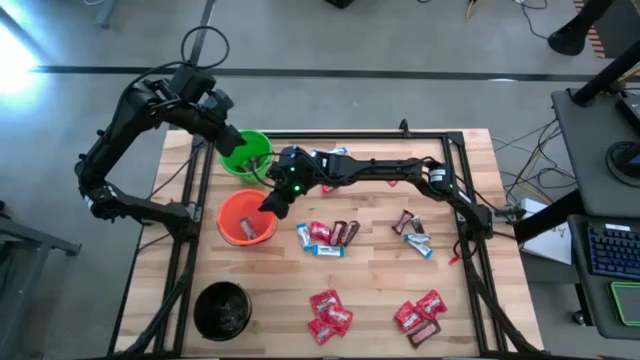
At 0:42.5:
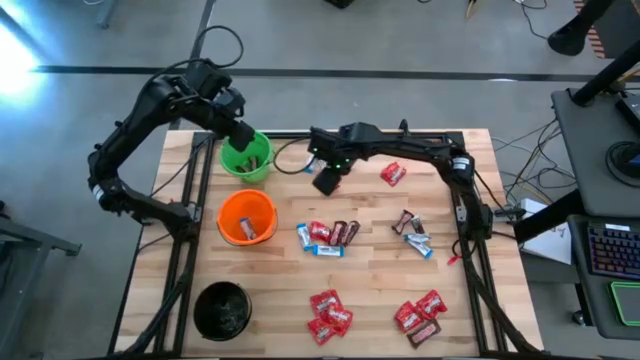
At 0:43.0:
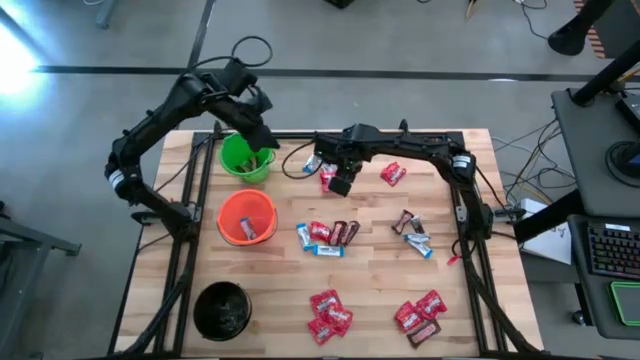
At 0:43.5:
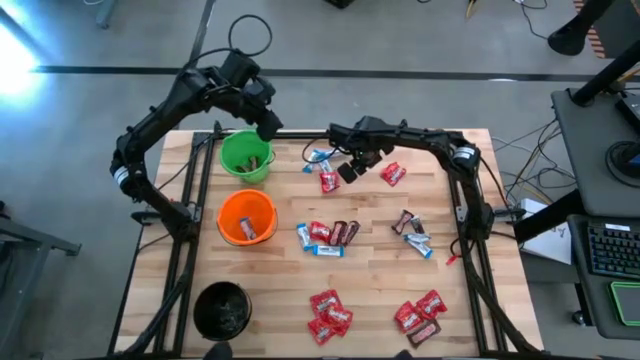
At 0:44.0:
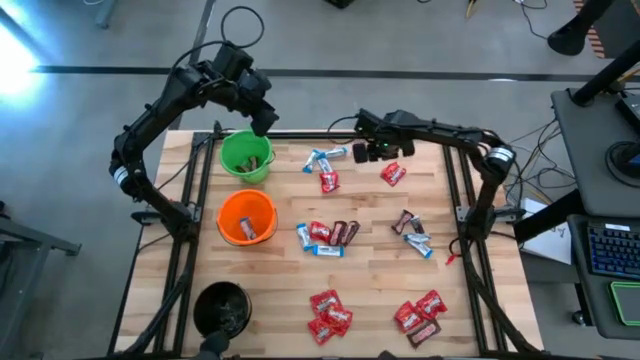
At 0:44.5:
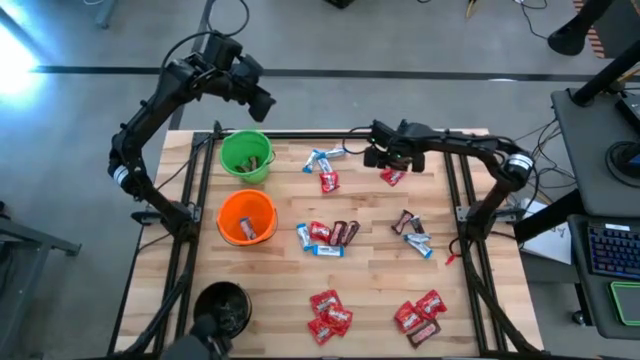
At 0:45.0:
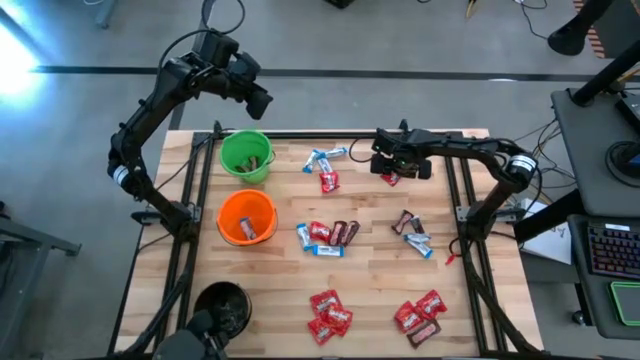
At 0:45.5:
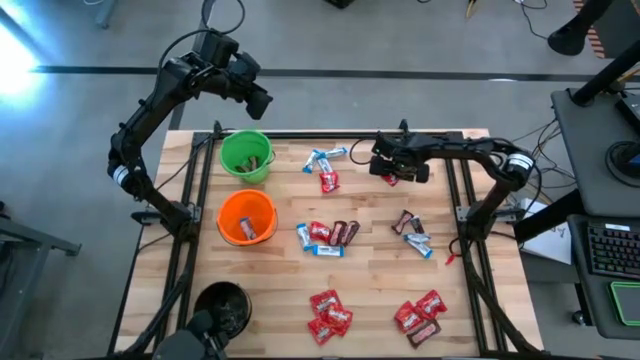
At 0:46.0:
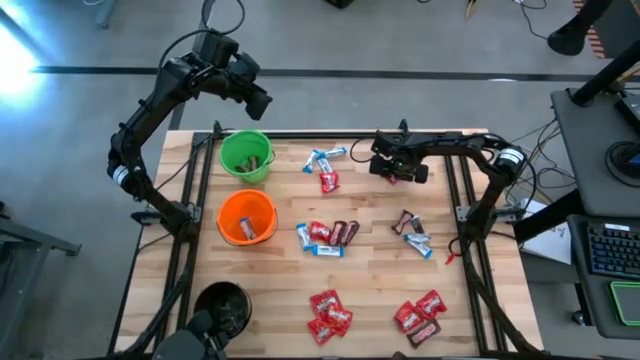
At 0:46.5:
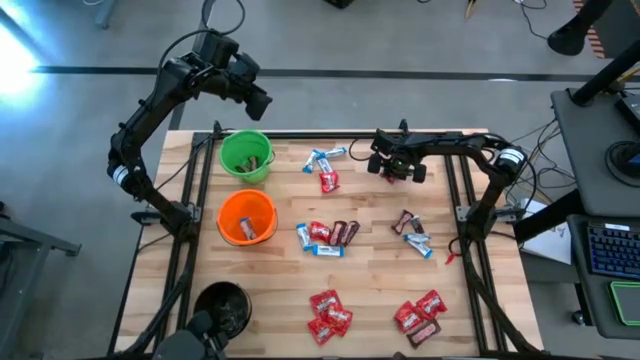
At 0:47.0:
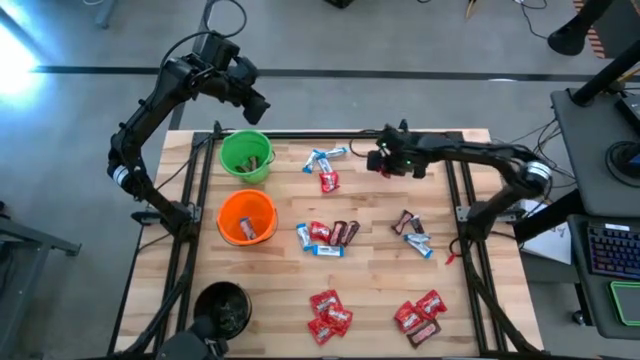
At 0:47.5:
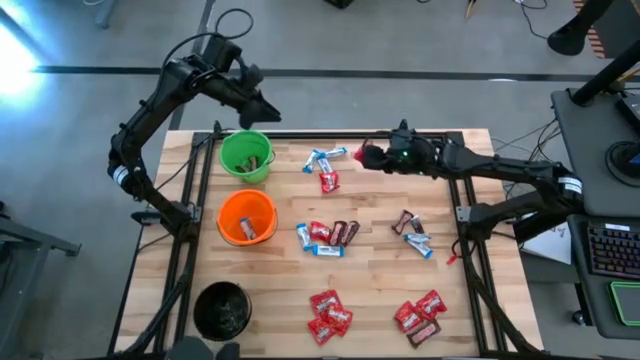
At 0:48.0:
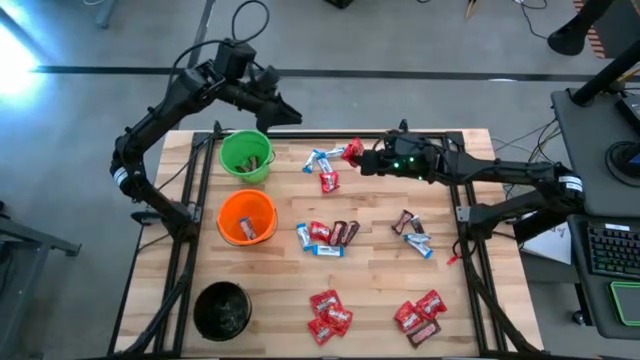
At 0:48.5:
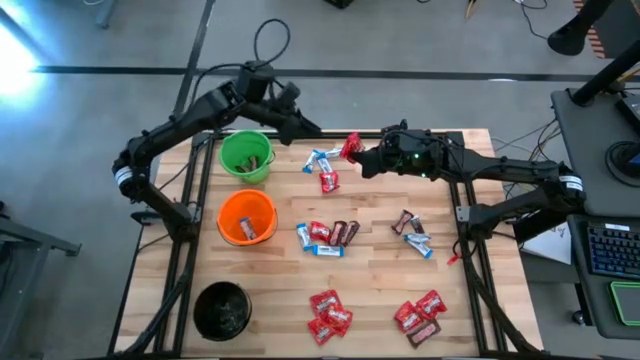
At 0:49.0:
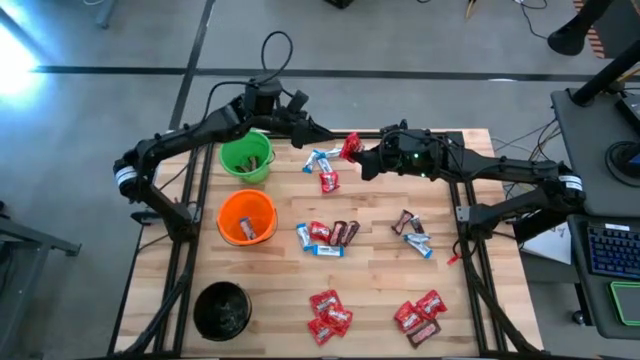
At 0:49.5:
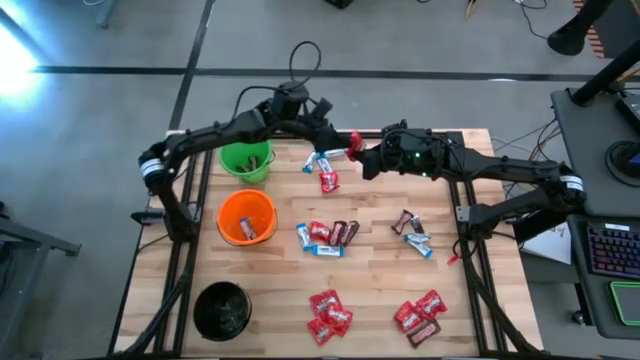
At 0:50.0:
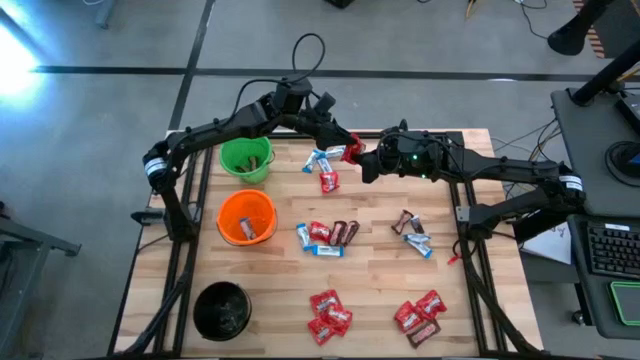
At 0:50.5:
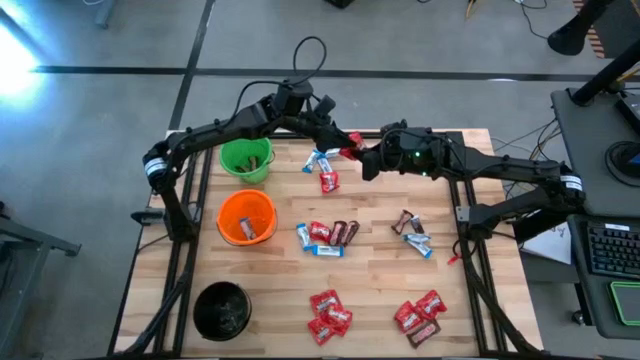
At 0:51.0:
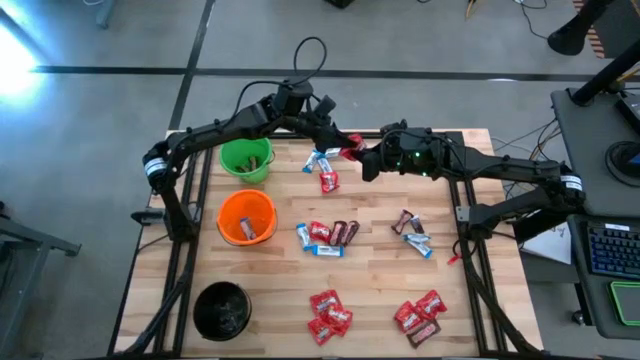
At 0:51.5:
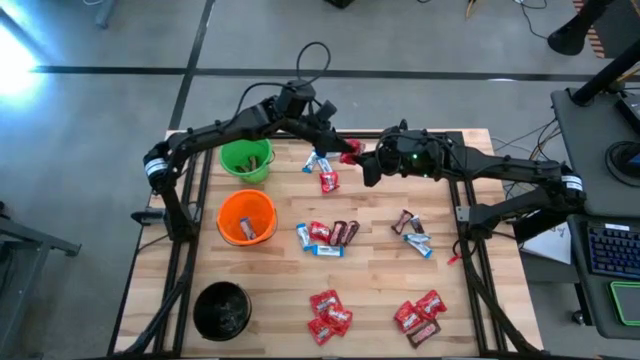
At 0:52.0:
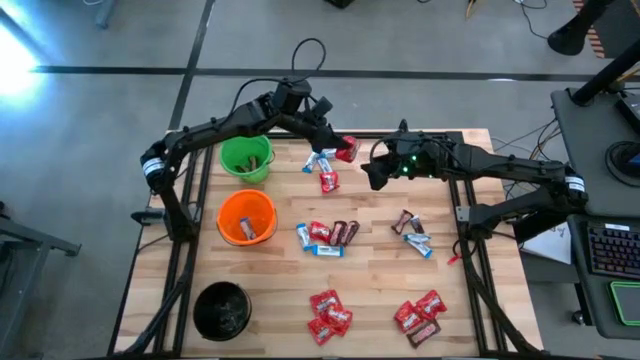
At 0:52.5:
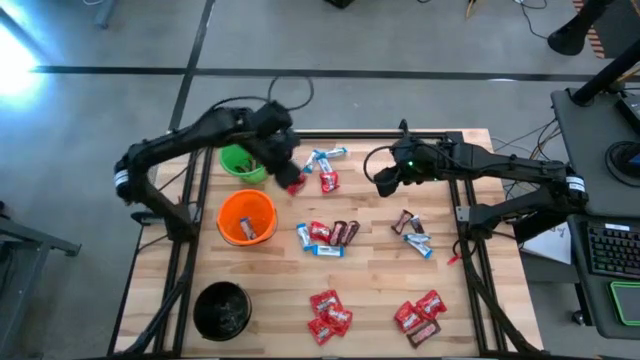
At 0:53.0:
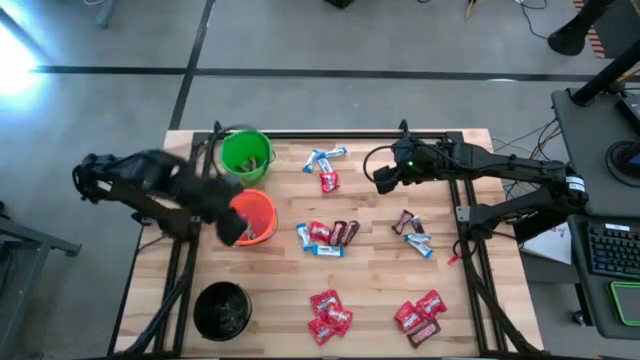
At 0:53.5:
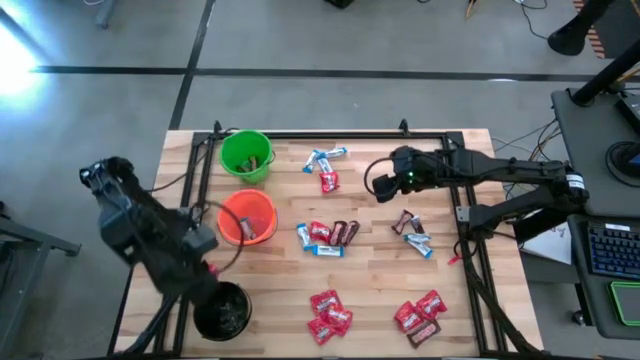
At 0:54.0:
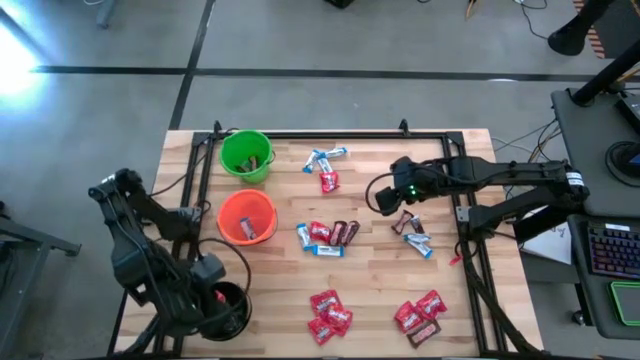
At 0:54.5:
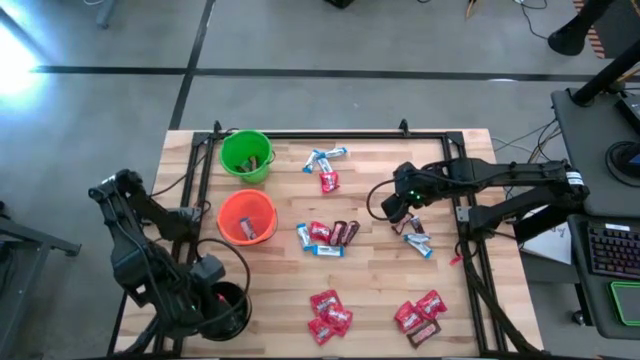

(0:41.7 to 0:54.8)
Task: Organize candy in baskets
Put the red candy into the black bucket

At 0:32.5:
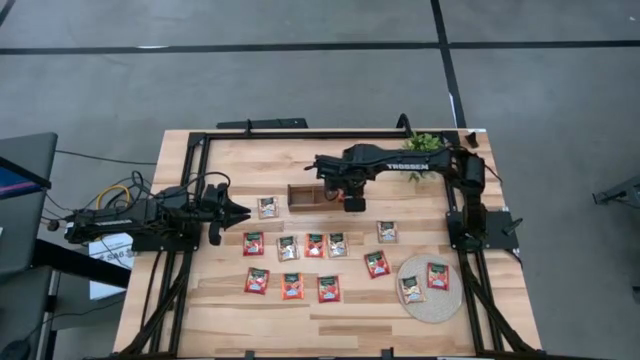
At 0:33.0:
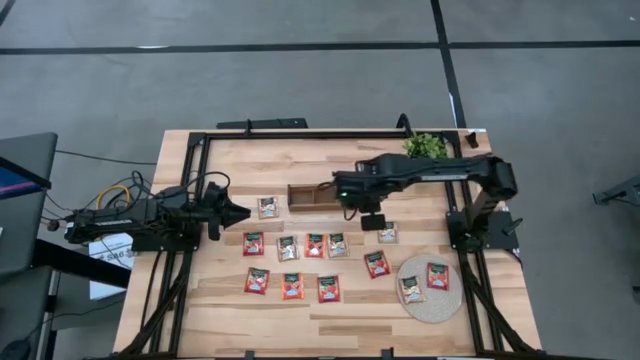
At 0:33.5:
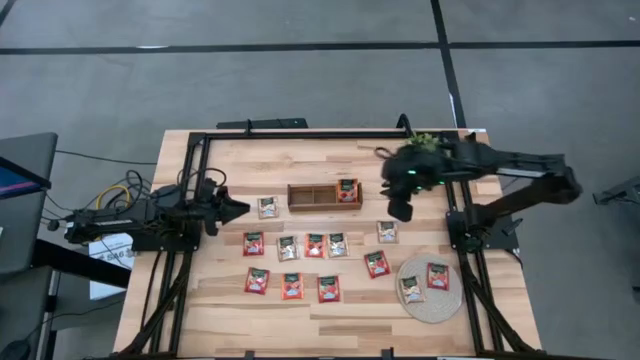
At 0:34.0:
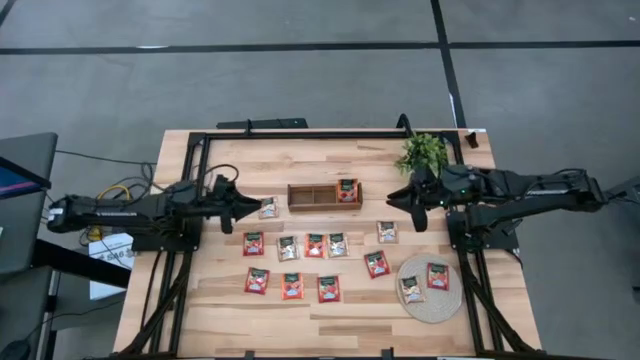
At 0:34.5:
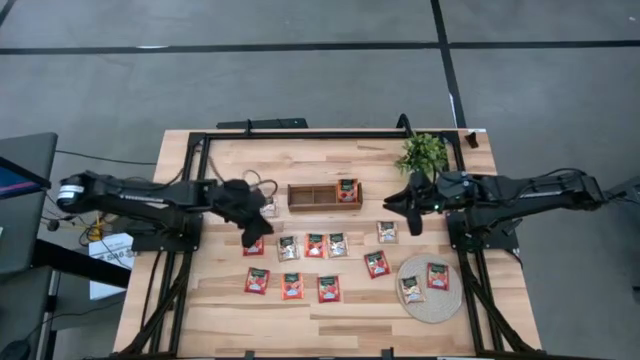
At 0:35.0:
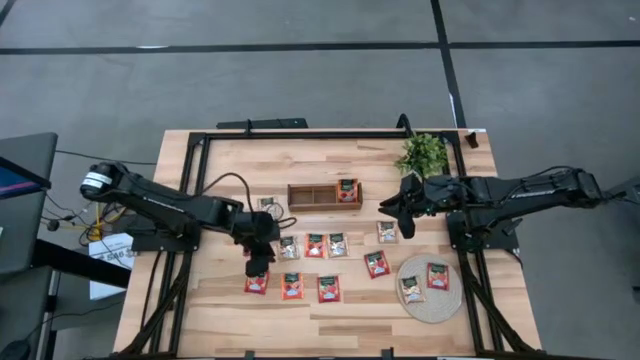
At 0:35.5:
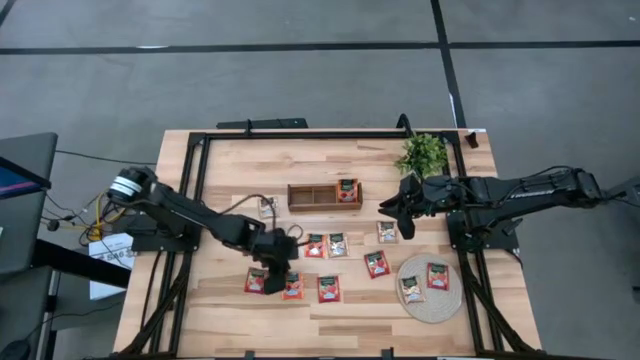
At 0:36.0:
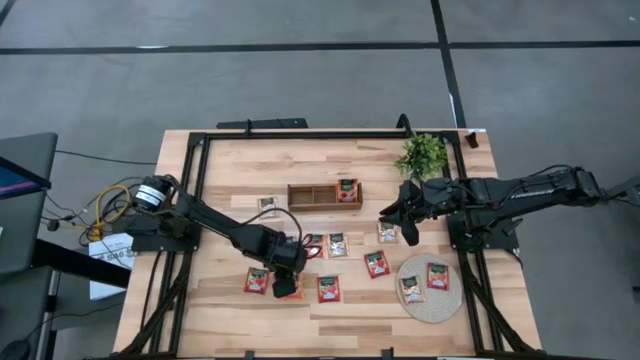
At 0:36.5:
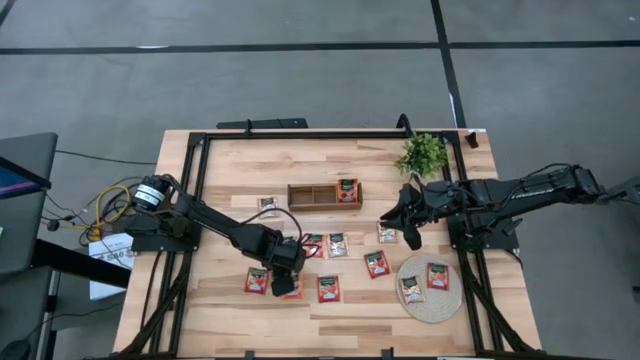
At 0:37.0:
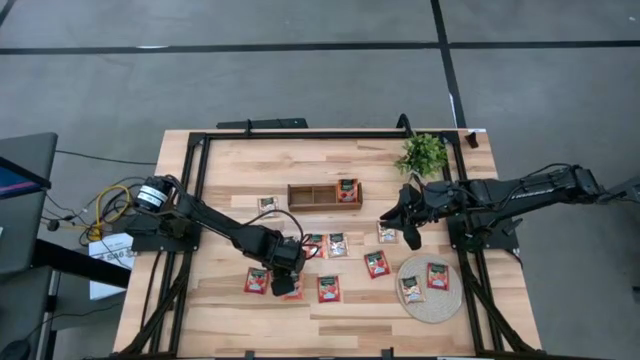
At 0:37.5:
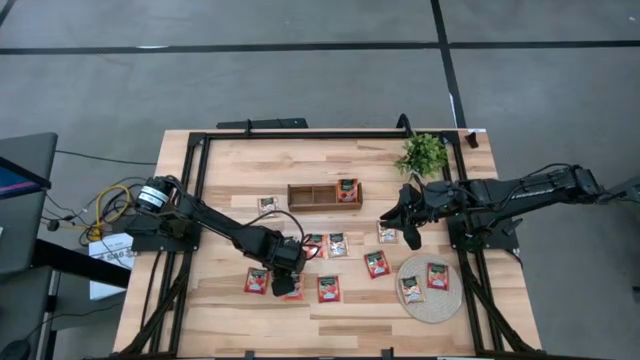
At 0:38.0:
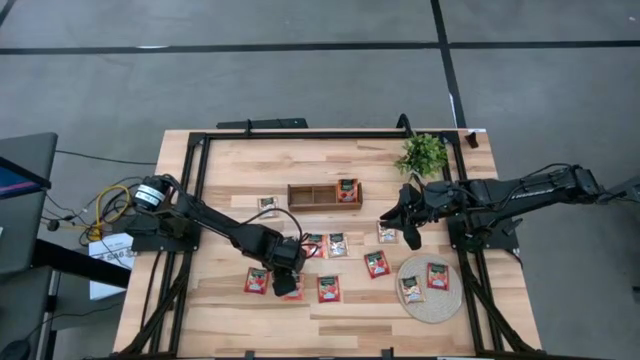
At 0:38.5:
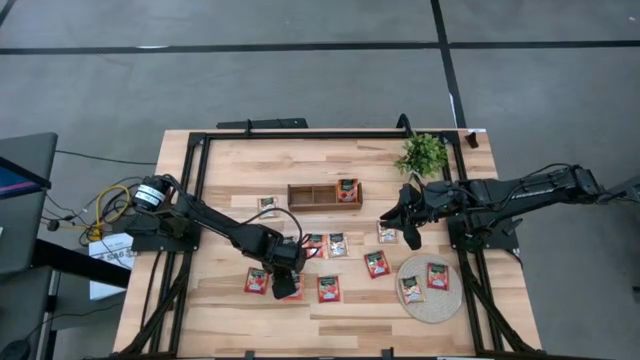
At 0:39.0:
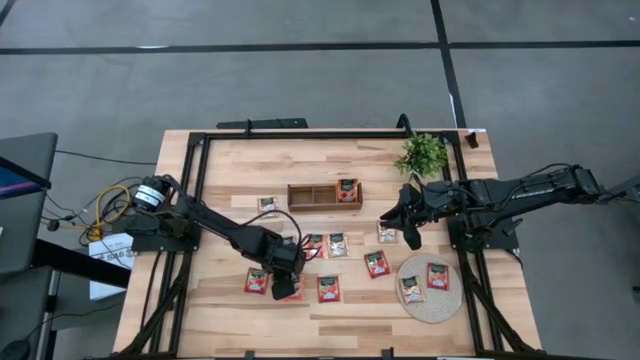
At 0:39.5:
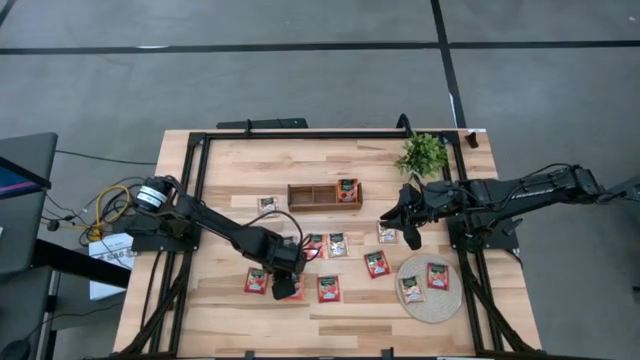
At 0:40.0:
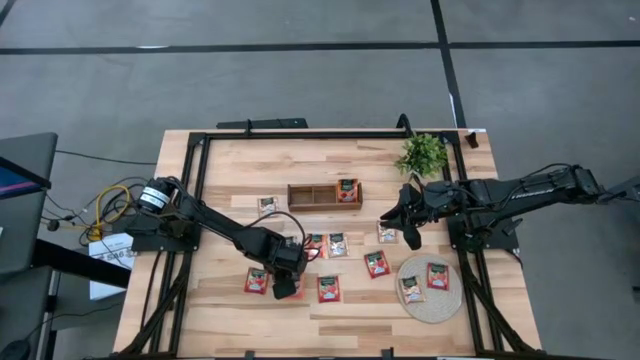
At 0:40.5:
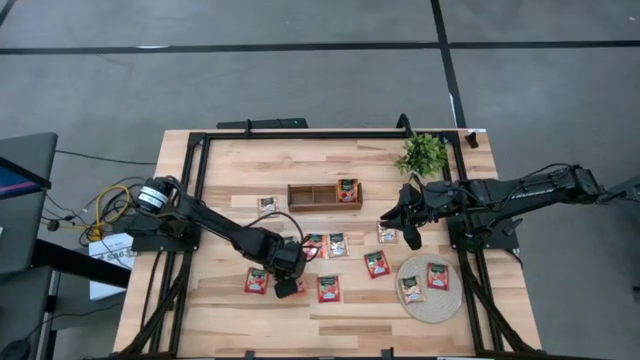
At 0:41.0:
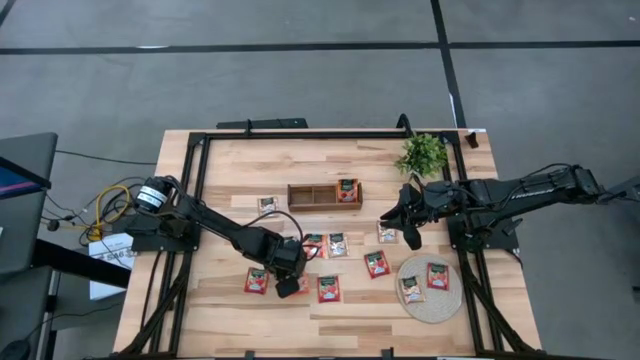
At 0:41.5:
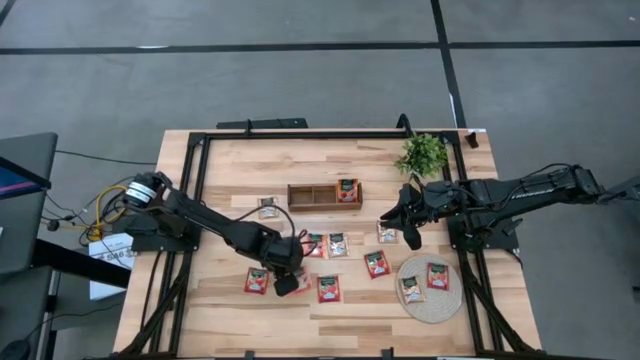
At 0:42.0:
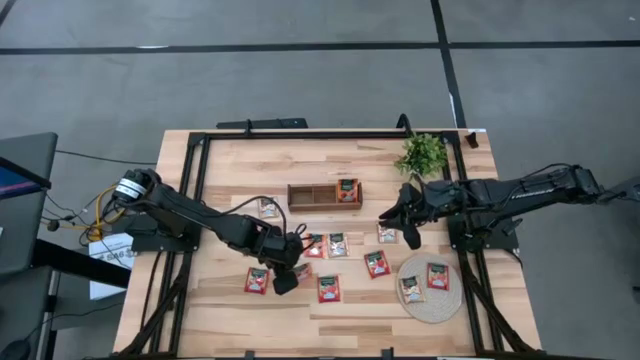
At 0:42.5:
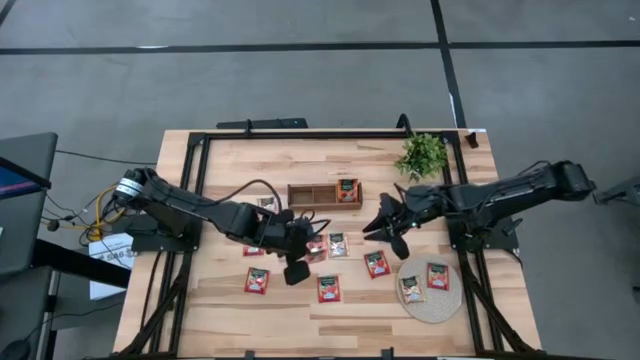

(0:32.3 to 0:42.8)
Task: Pick & Place Tea
Put the orange tea bag into the right section of the wooden organizer
